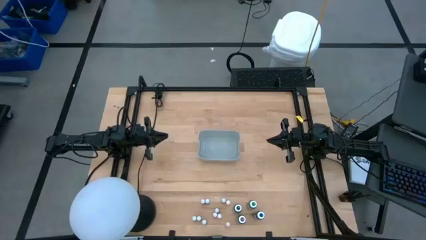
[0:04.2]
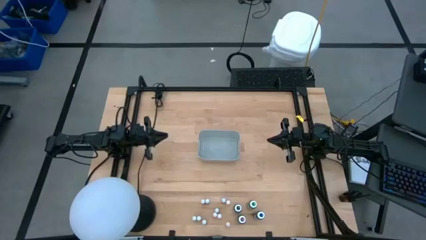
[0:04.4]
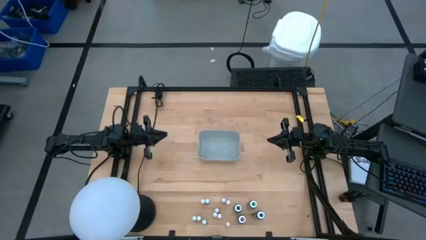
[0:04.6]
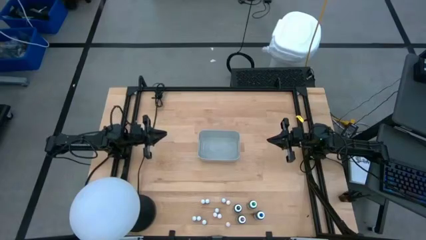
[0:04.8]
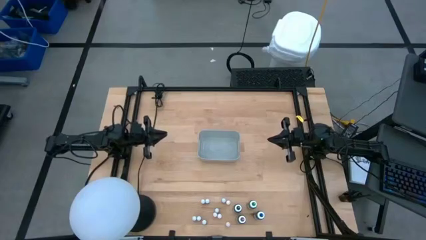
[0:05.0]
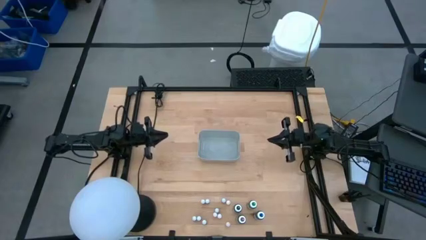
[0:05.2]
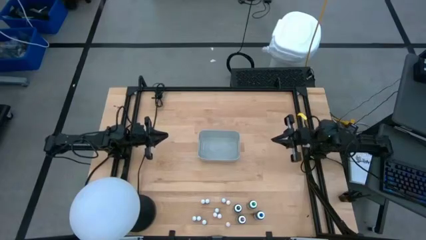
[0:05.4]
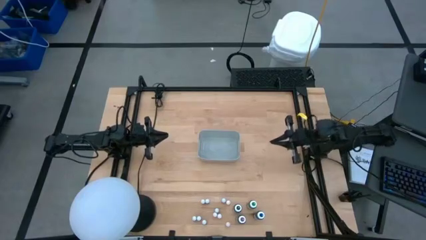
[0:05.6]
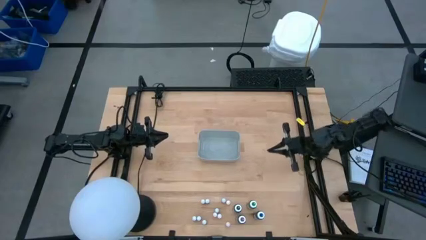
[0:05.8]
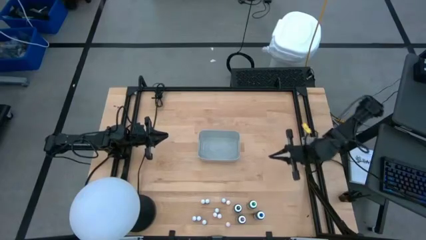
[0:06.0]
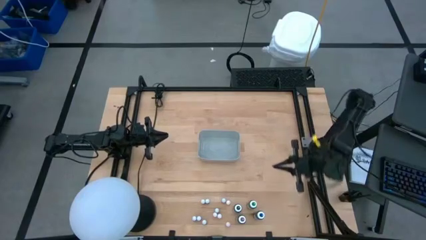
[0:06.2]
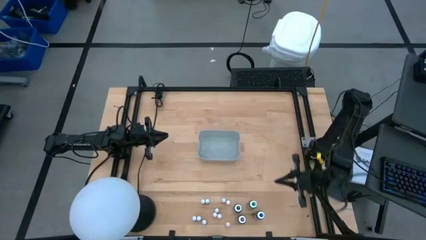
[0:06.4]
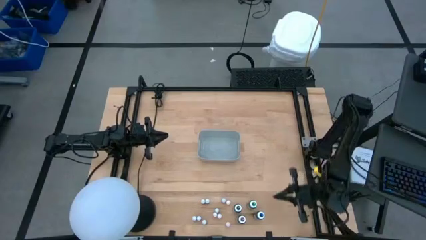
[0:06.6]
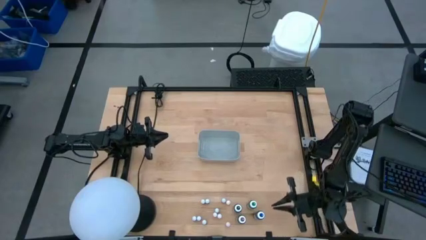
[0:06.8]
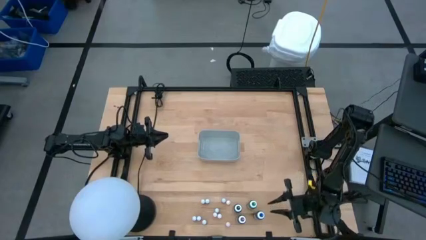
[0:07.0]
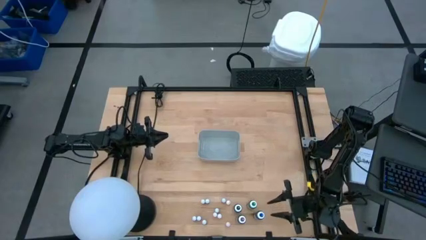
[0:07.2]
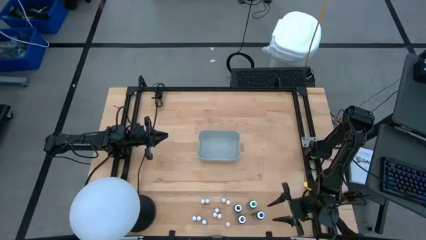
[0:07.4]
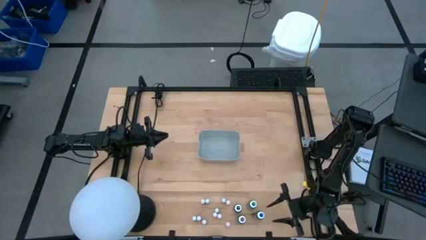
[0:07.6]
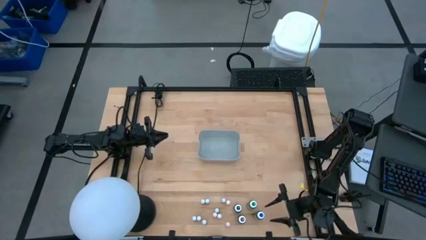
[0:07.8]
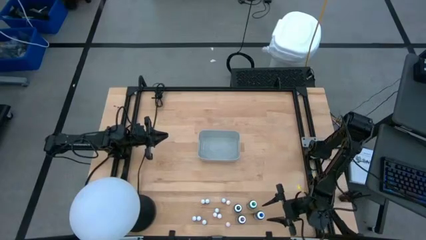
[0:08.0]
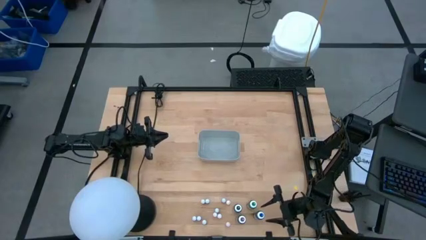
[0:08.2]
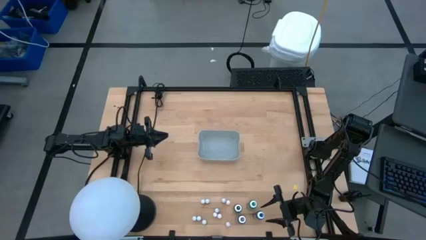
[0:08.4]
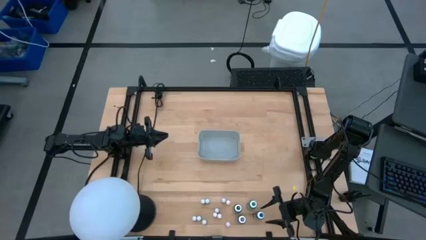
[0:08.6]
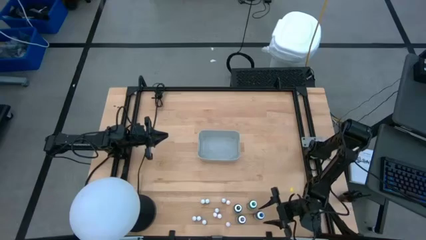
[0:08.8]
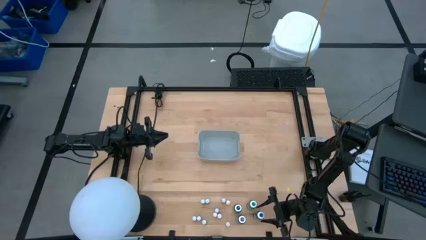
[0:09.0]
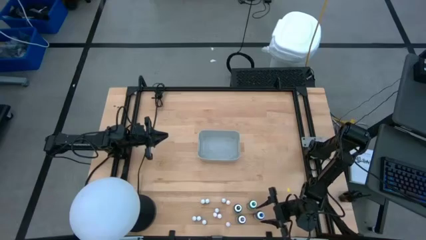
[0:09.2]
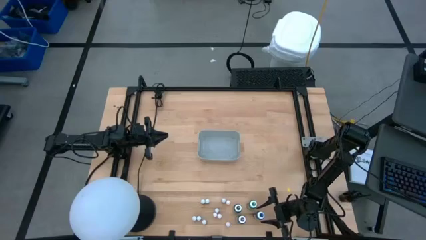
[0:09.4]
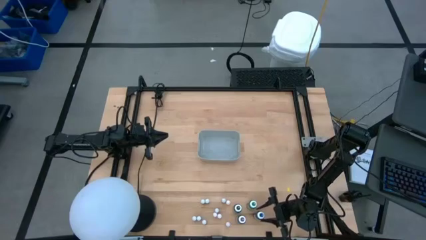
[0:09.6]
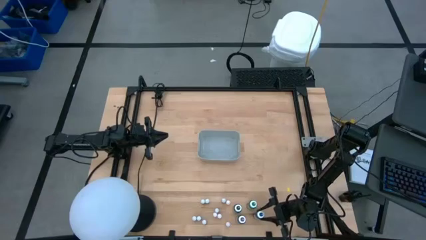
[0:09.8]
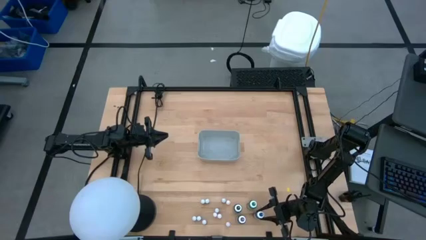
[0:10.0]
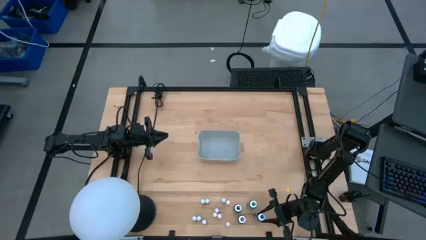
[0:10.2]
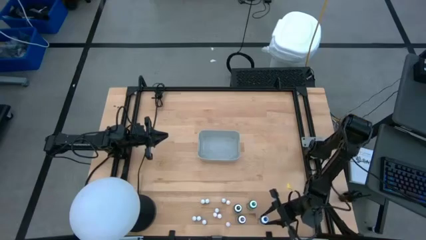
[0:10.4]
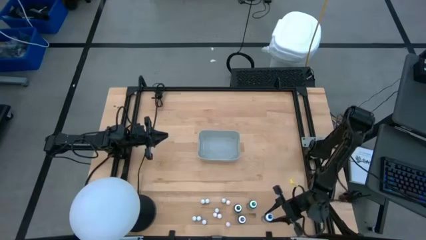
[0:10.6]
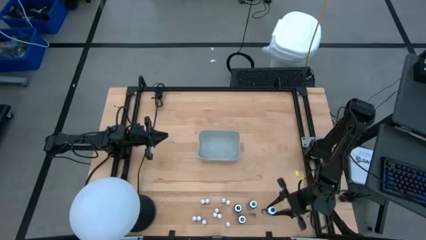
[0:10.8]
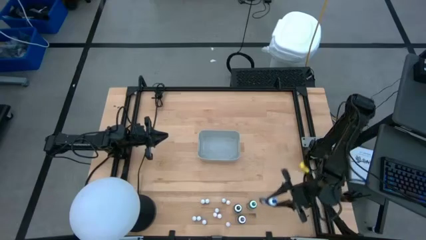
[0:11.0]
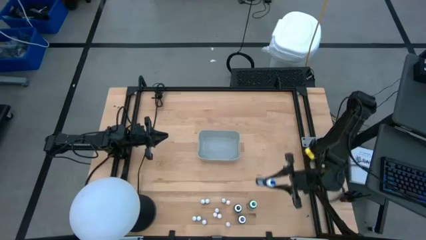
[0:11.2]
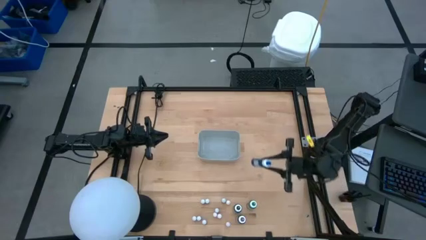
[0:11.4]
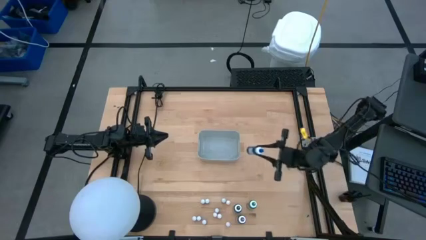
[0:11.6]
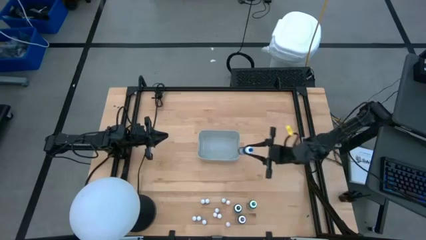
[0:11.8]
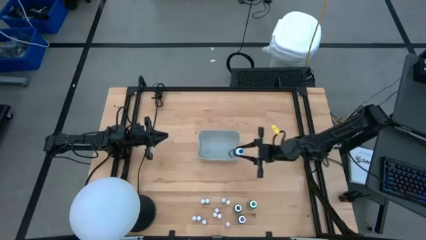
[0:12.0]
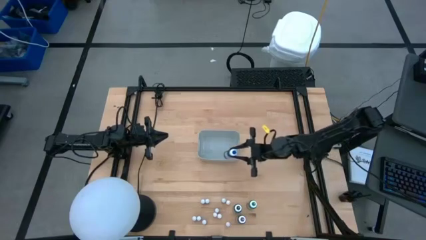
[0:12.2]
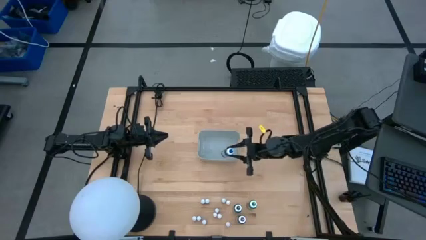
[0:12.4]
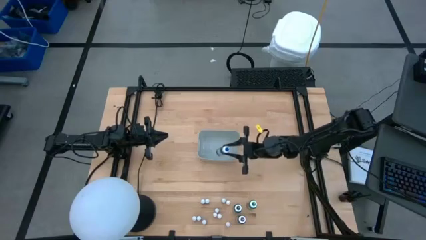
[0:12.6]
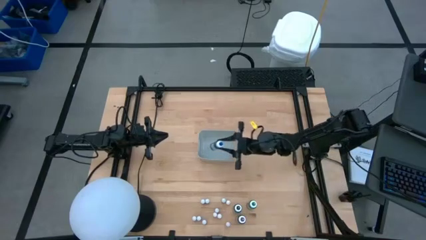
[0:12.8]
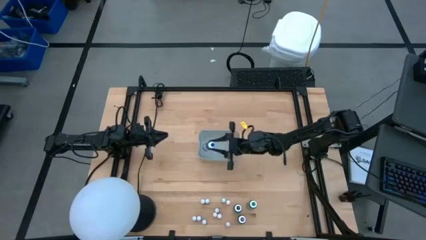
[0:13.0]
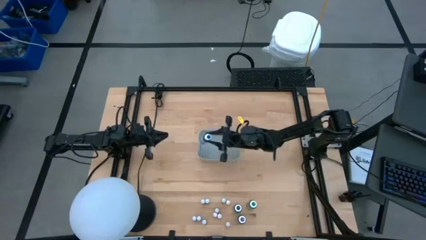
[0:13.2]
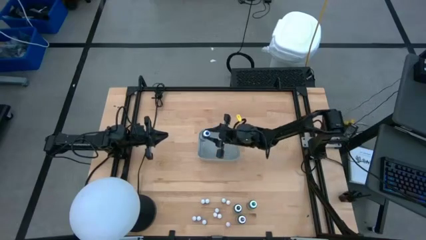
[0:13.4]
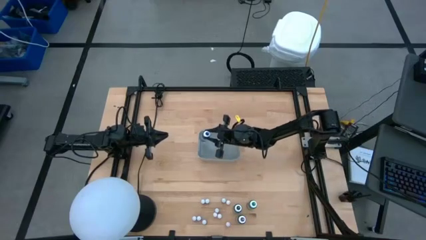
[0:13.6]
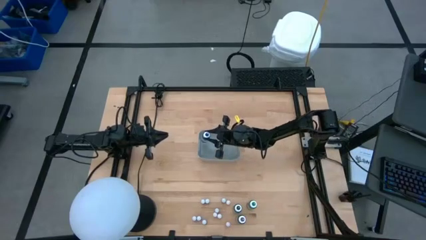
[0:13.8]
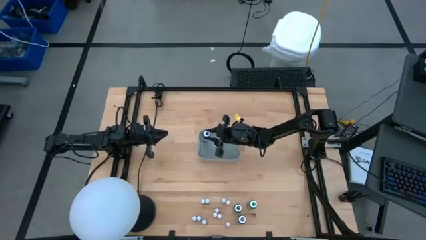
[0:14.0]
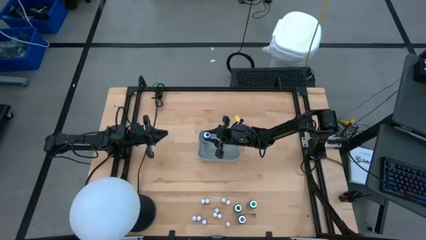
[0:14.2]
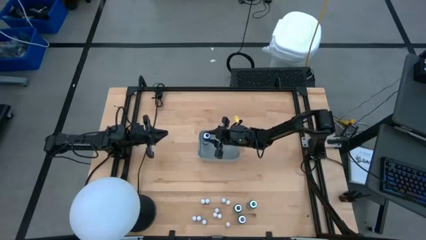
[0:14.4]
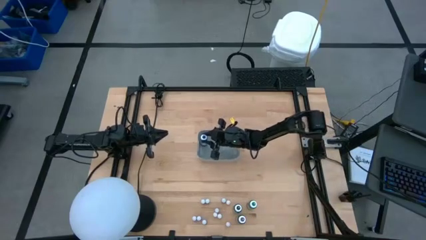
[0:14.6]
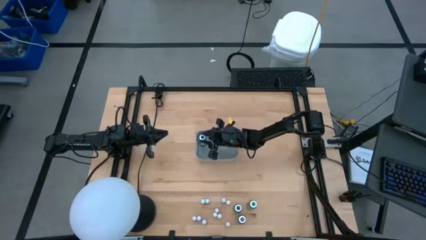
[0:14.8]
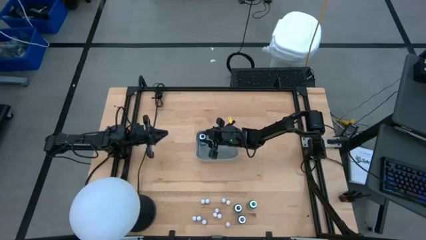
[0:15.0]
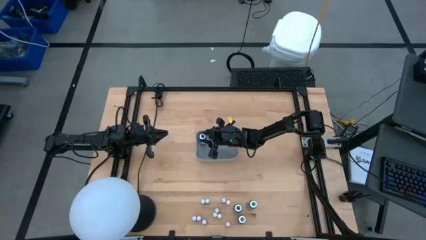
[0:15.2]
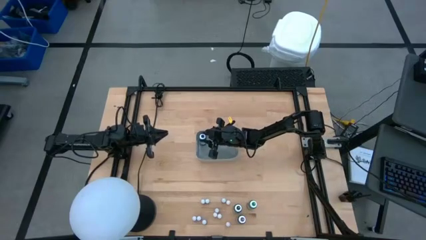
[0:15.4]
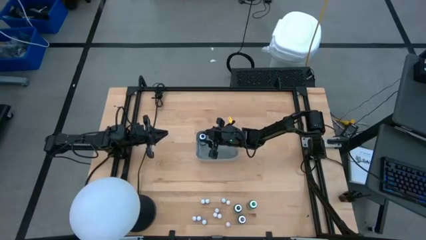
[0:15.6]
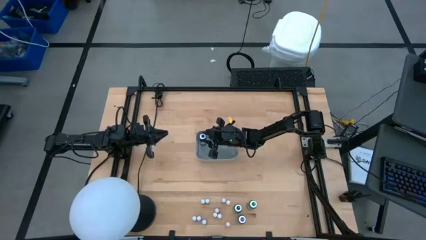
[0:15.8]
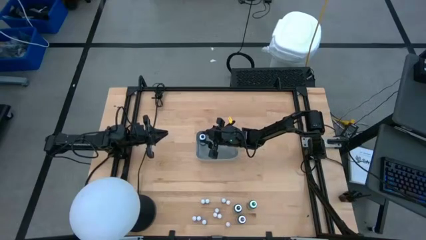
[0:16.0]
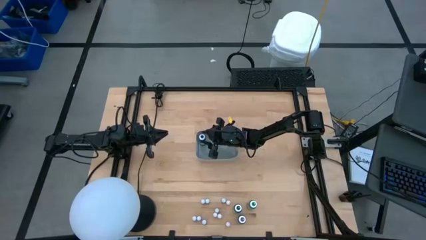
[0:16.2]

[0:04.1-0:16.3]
Task: Pick & Place food coloring
Put the large blue food coloring bottle into the gray bin
